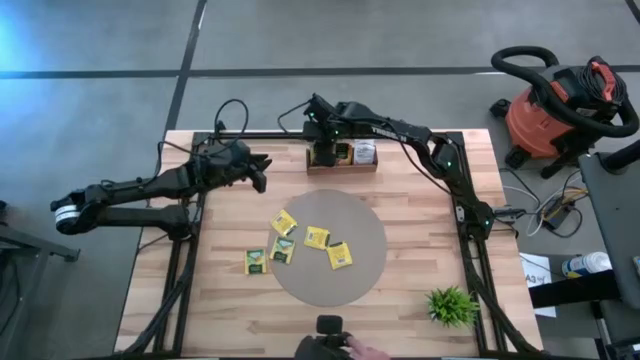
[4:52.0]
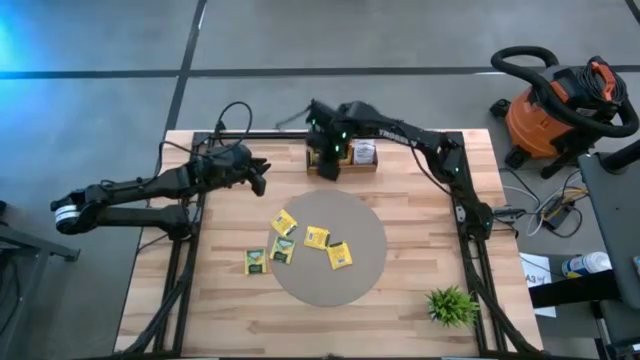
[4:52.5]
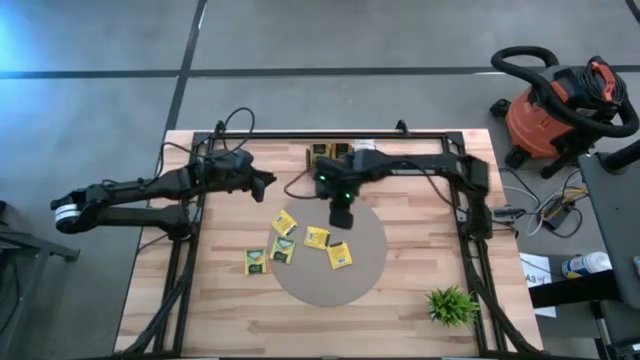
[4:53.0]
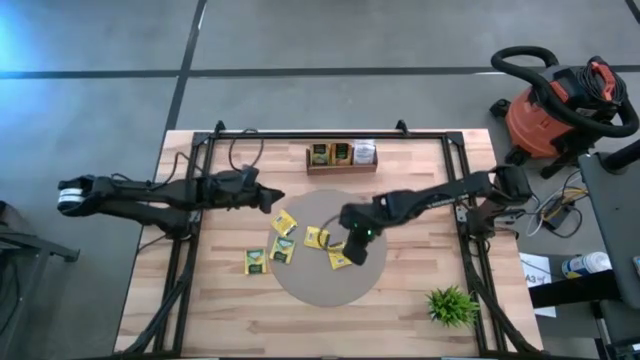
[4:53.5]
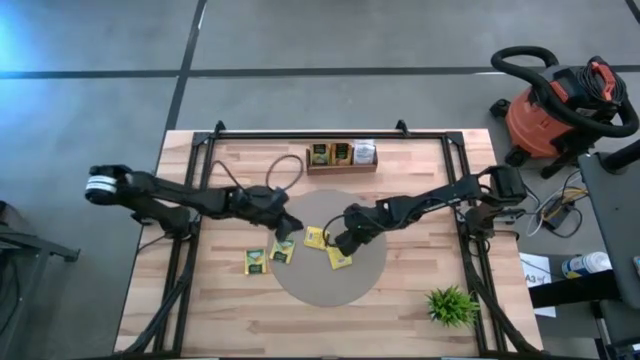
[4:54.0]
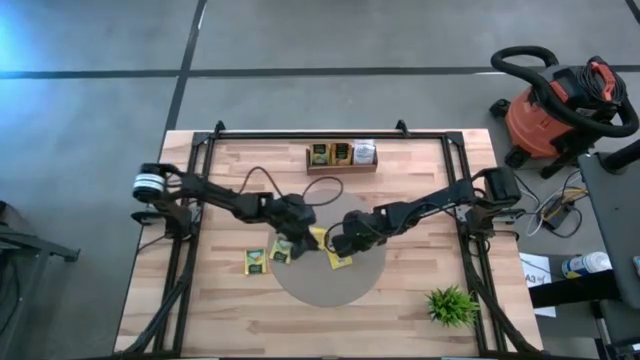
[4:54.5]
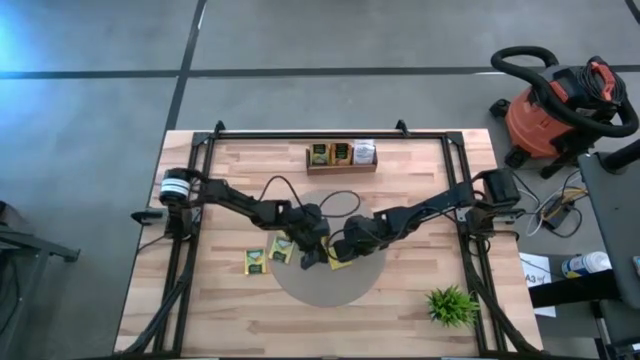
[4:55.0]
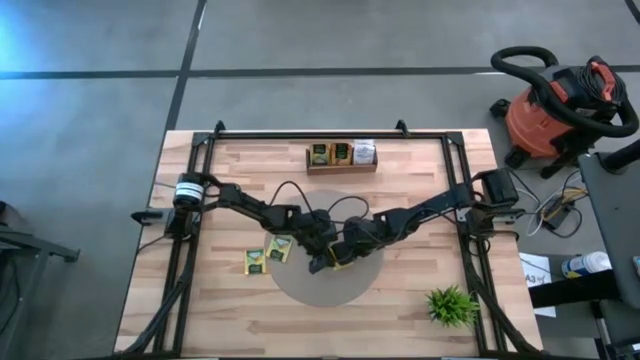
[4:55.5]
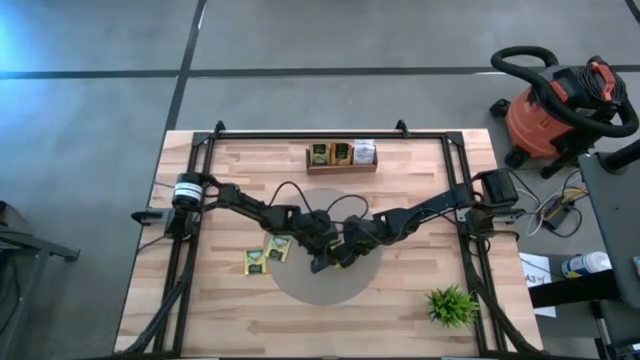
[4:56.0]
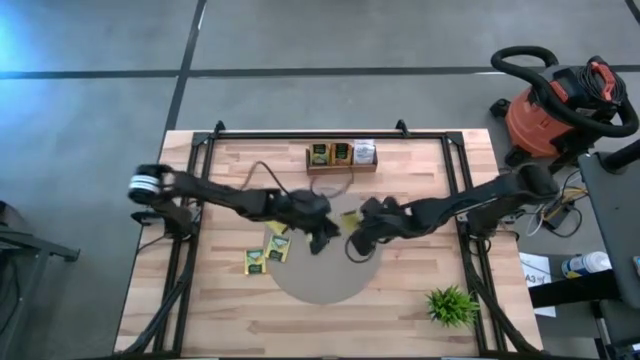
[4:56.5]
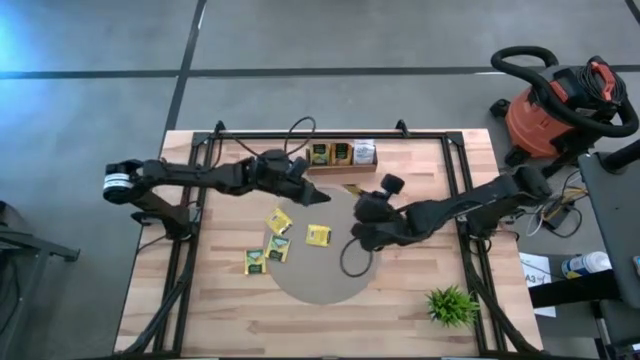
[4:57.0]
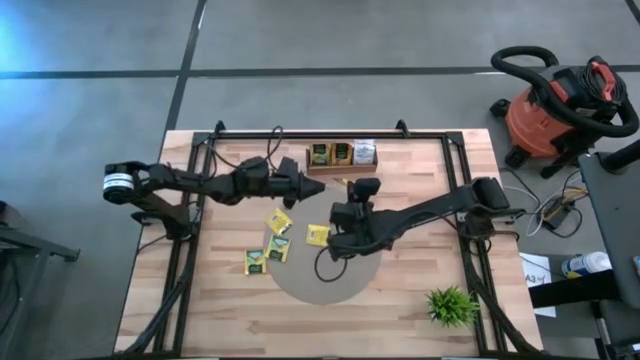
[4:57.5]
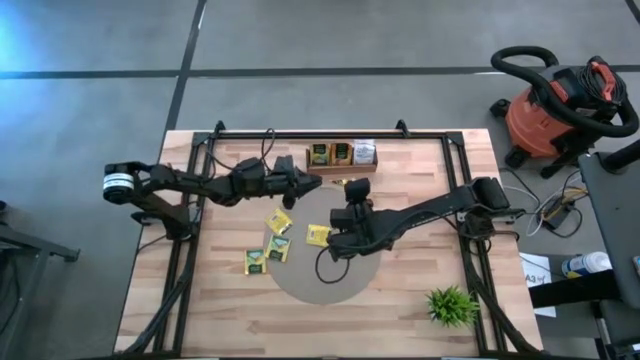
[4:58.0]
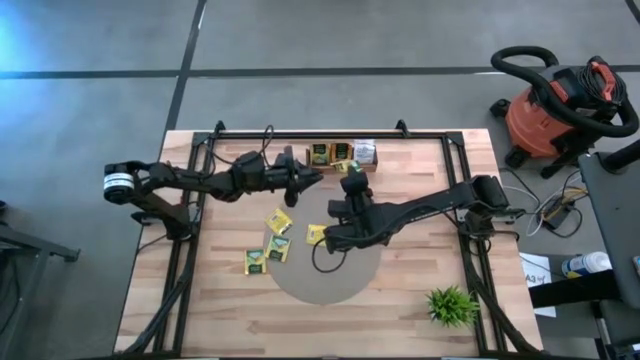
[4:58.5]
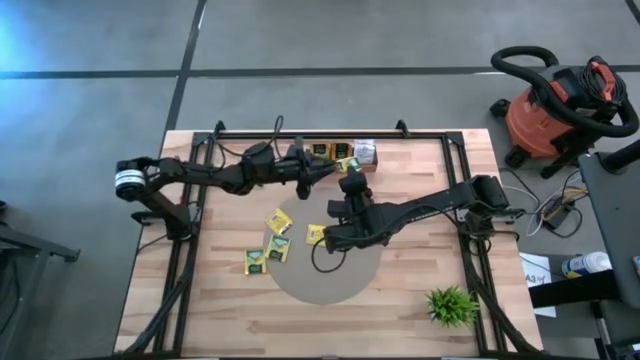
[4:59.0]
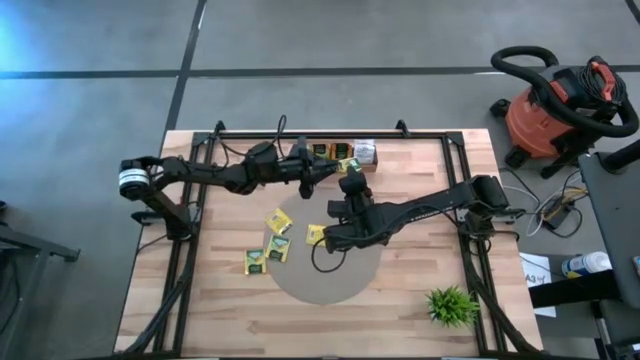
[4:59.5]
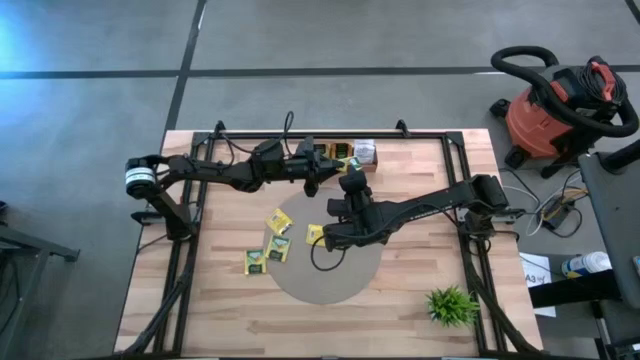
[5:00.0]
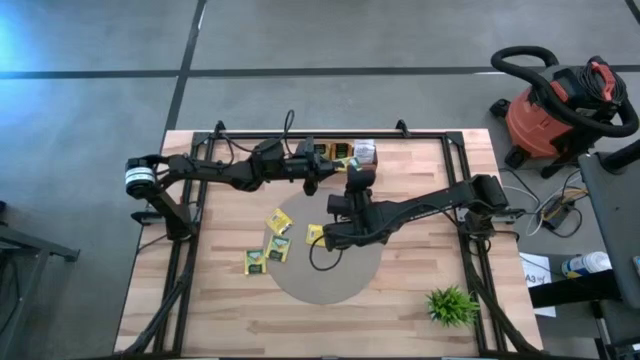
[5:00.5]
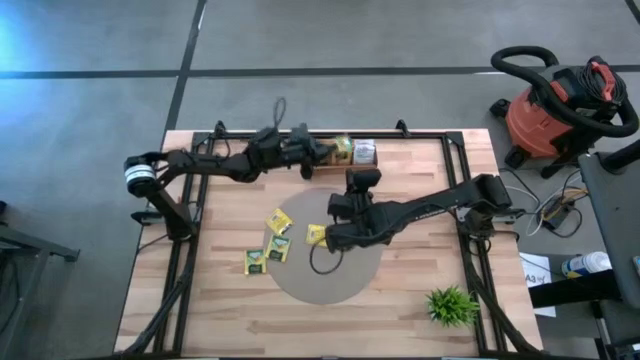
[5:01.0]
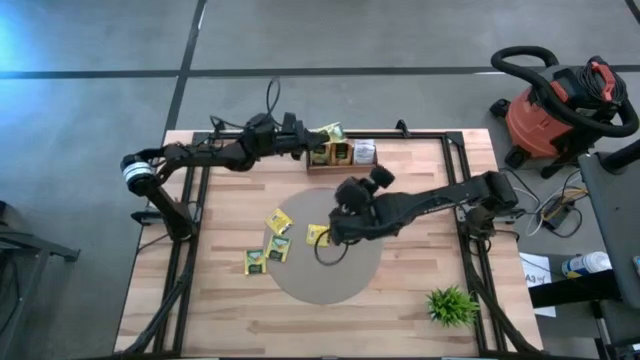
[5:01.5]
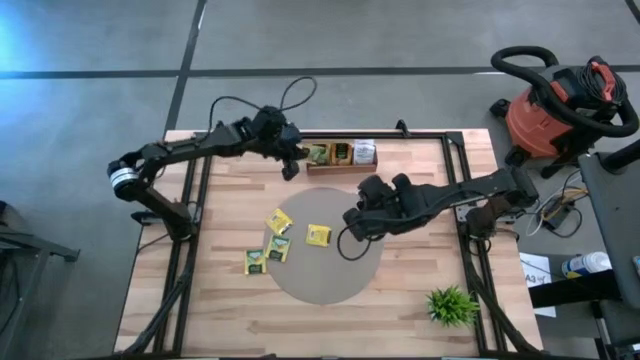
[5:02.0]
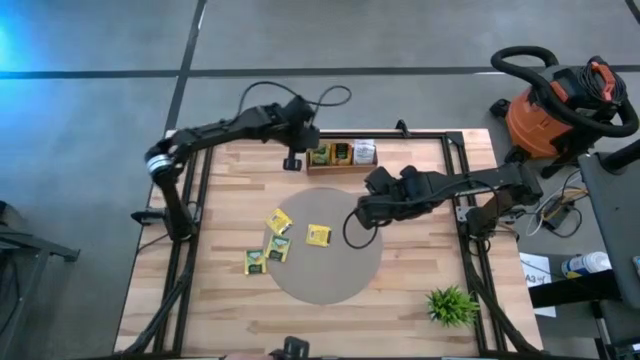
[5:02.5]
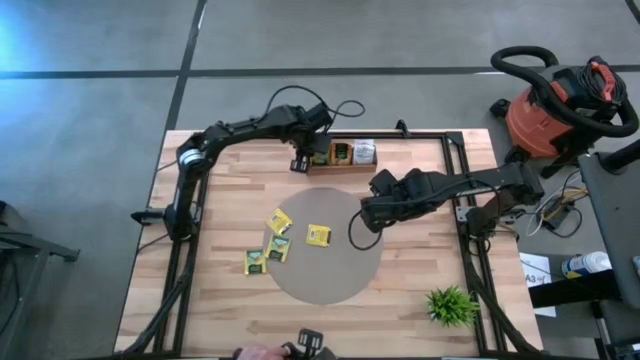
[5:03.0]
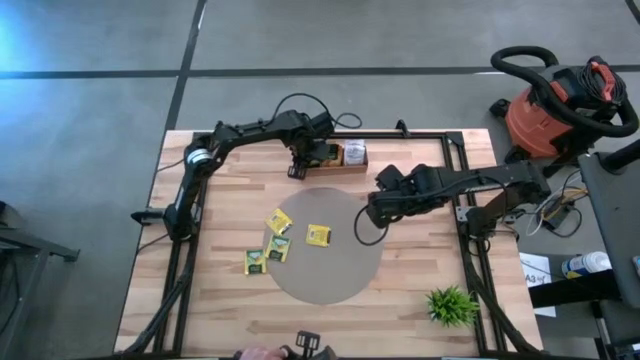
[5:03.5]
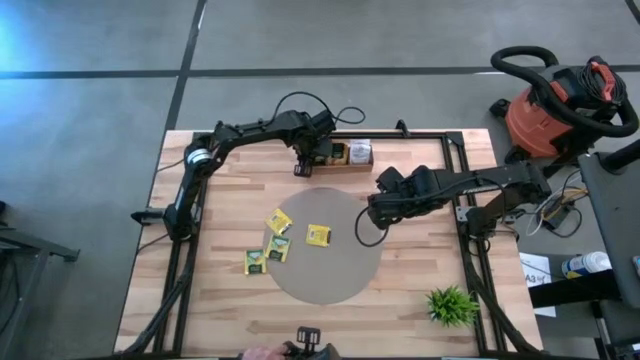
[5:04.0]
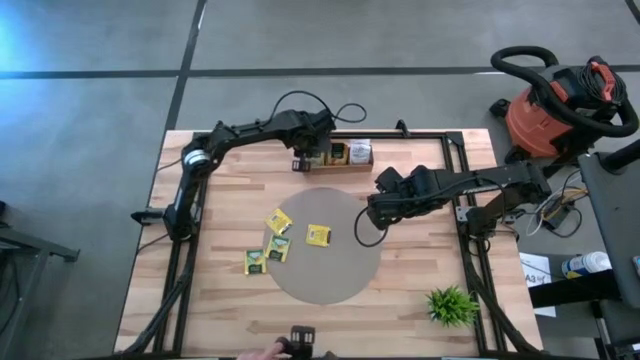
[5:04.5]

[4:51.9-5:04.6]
Task: Pick & Place Tea
Put the yellow tea bag into the left compartment of the wooden organizer

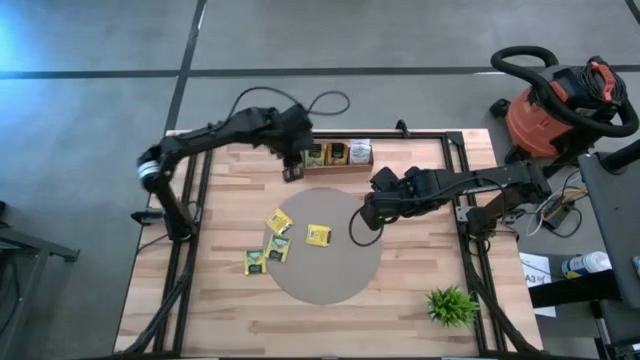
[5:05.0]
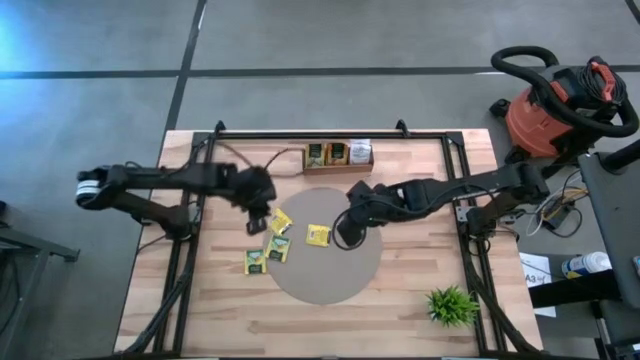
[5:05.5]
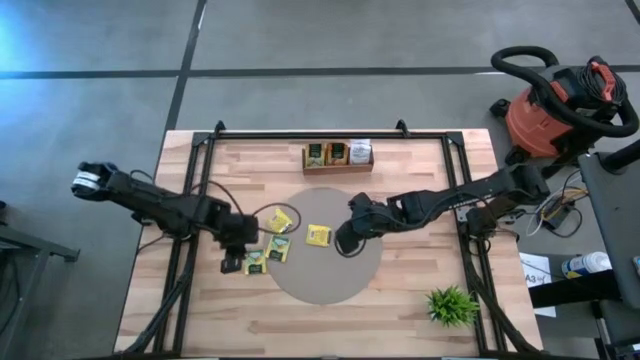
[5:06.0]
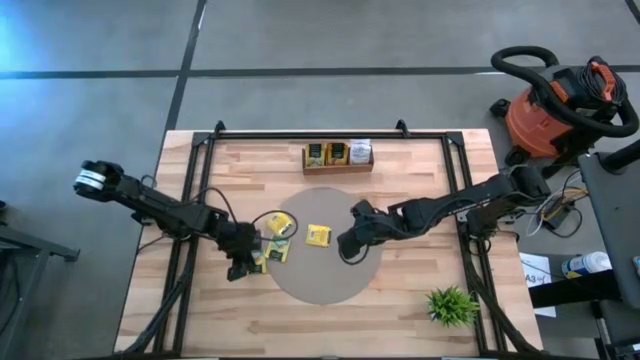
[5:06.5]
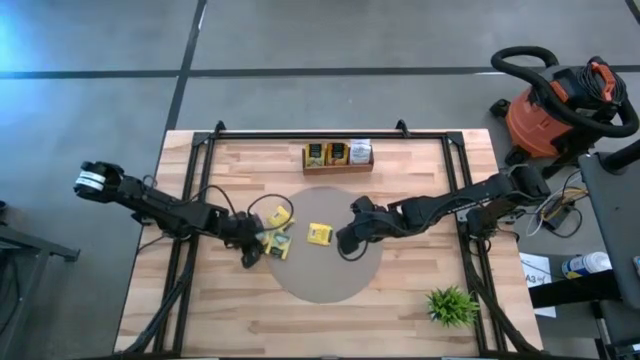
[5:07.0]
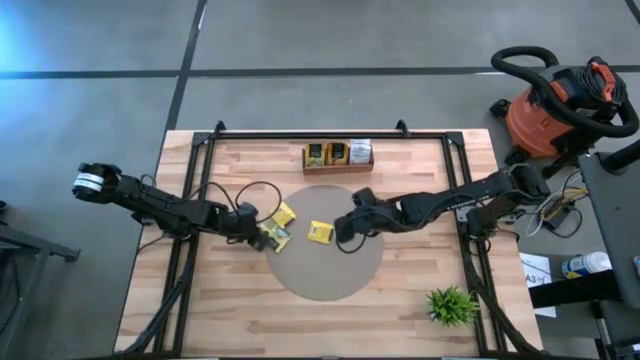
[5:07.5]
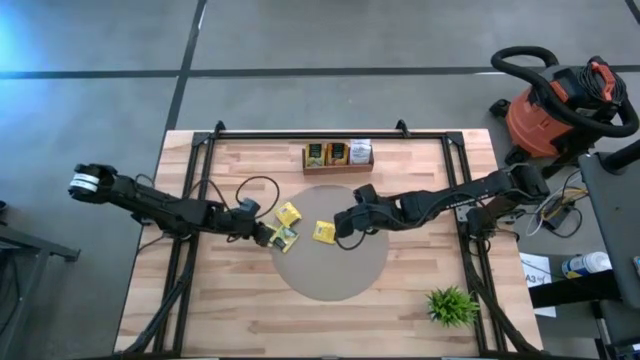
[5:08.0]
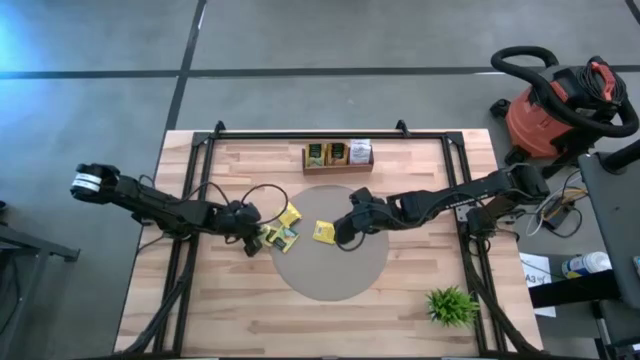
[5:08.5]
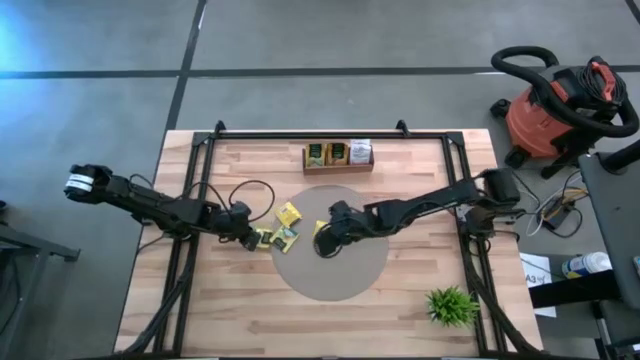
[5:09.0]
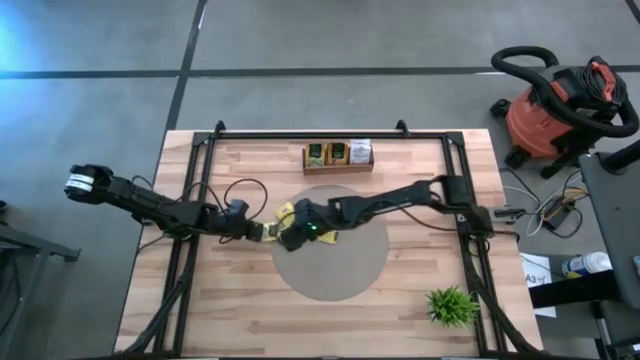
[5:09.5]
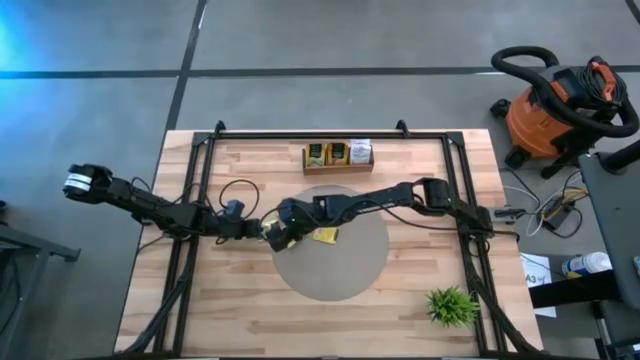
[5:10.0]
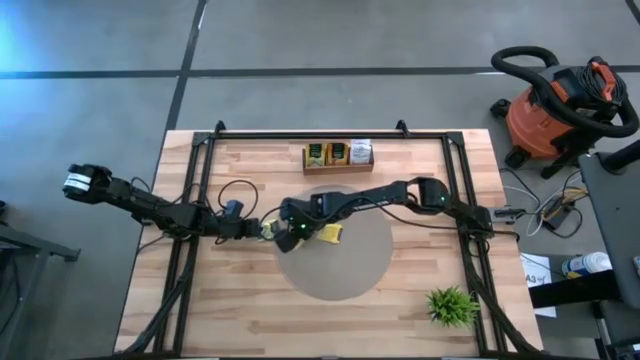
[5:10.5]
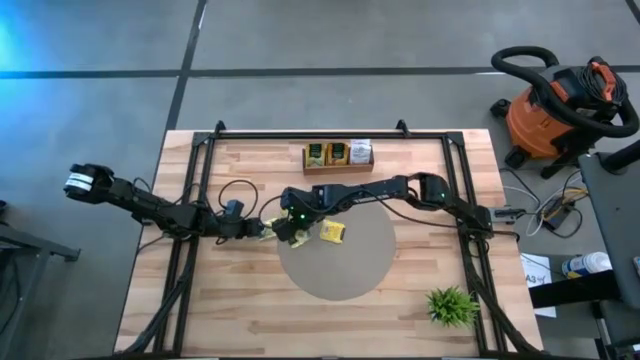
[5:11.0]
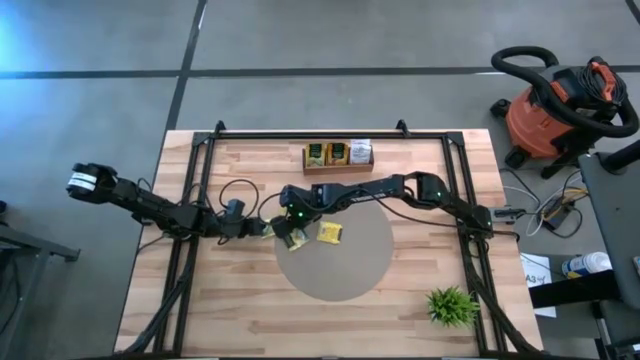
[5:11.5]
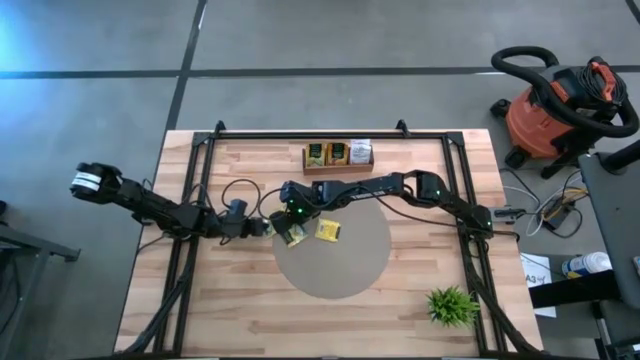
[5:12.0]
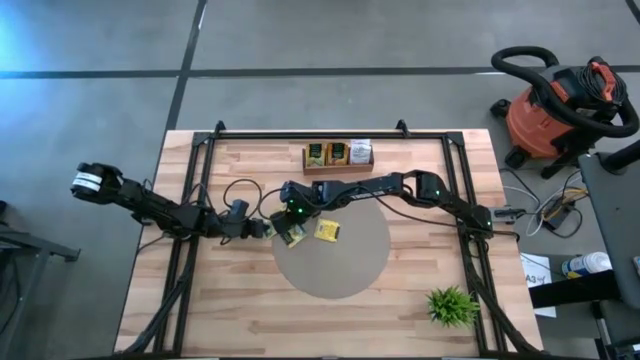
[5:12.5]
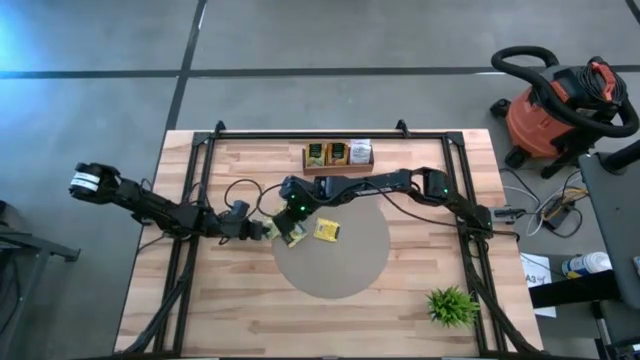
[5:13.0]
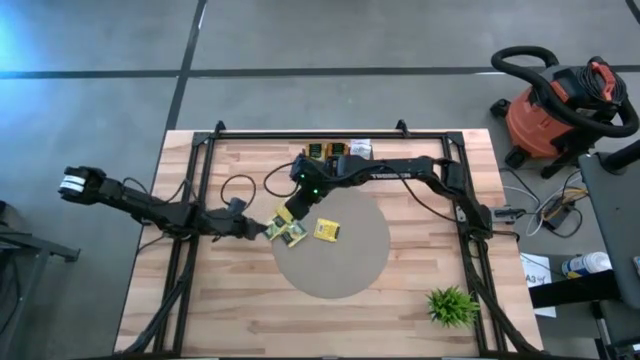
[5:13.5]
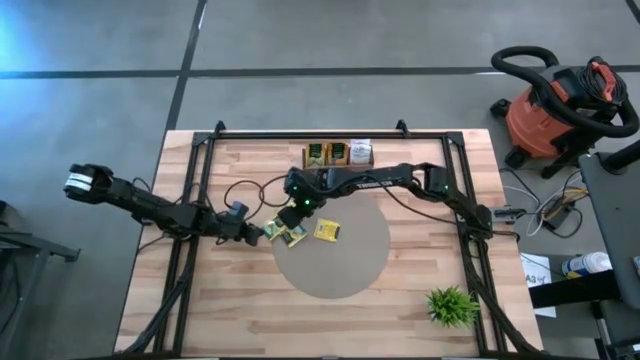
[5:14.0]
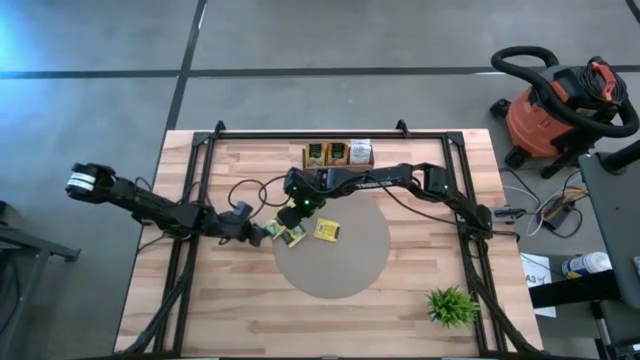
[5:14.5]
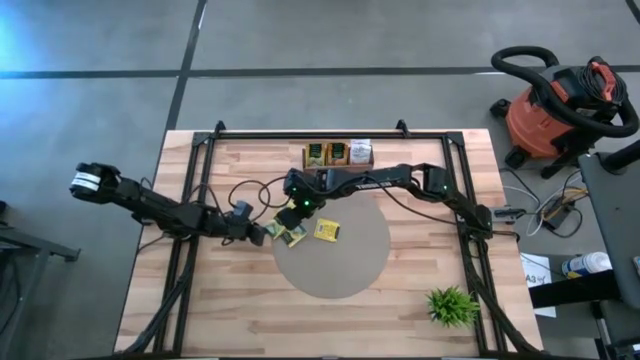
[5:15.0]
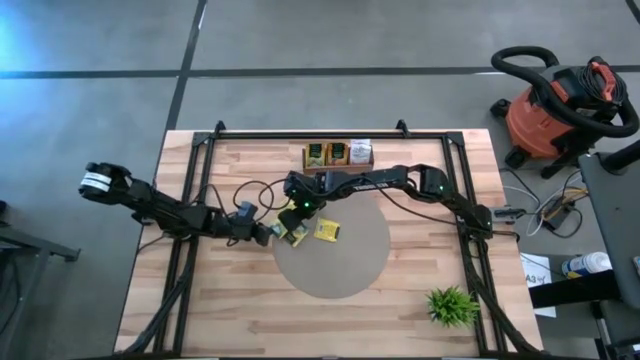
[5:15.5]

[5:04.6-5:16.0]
Put the yellow tea bag into the left compartment of the wooden organizer
